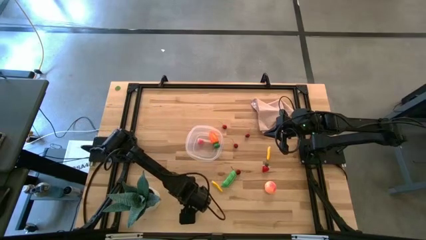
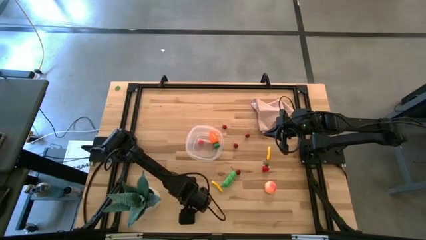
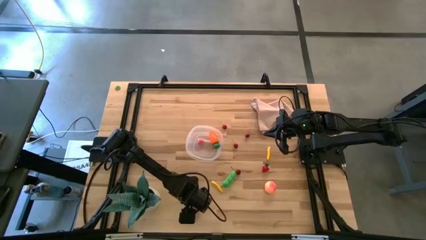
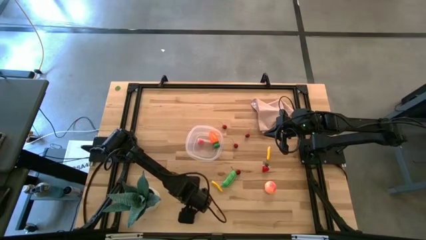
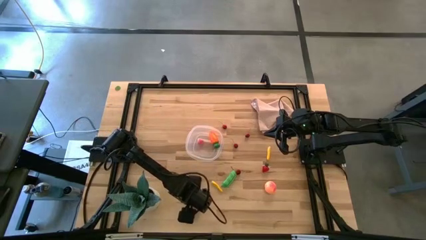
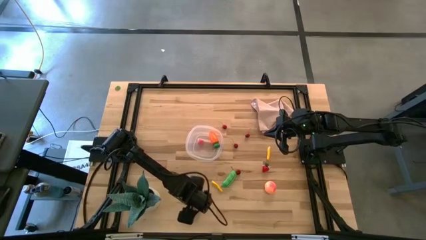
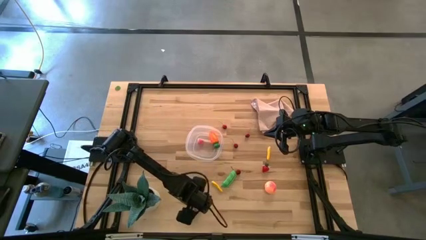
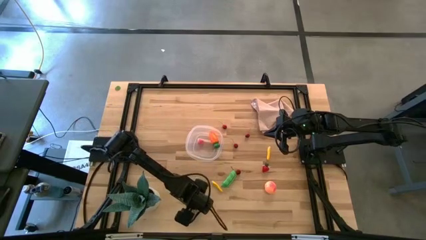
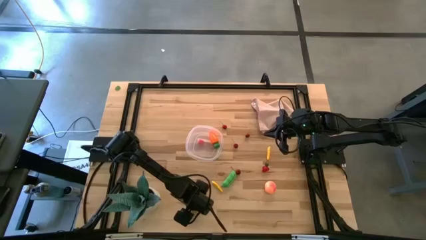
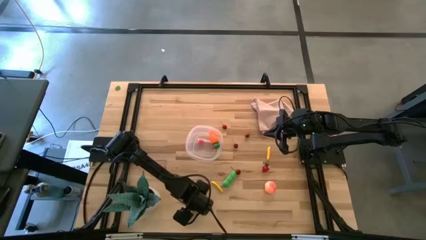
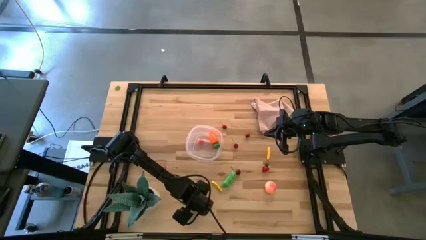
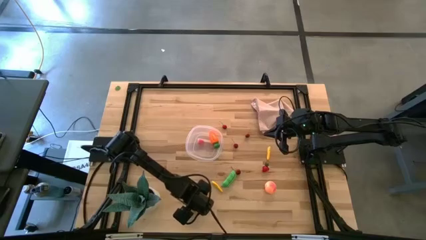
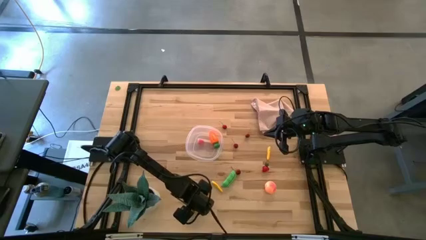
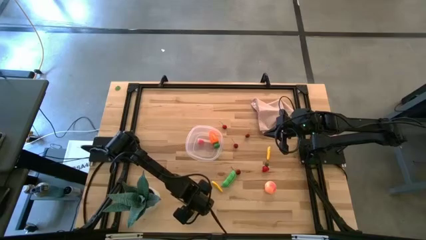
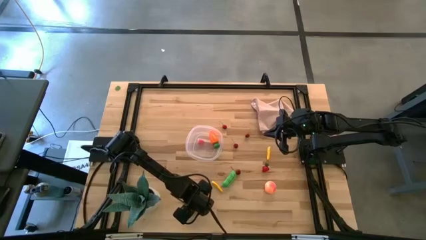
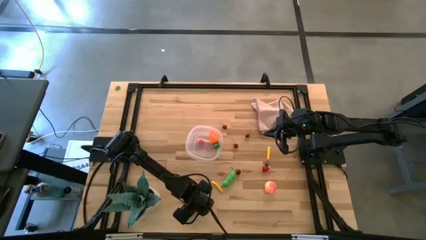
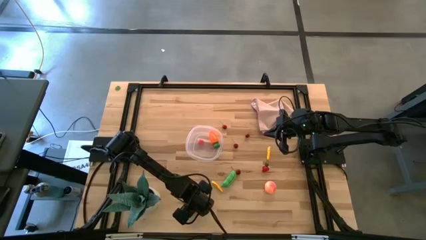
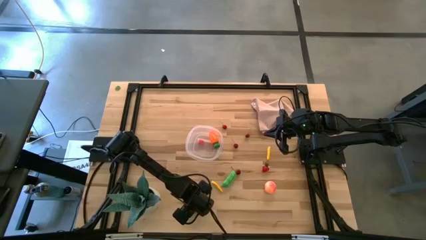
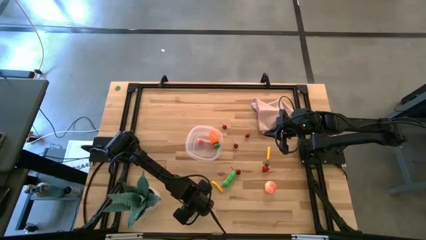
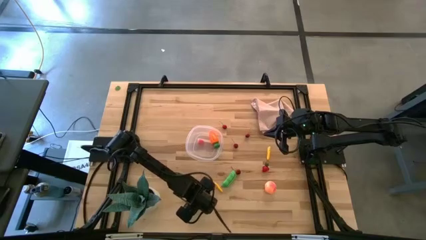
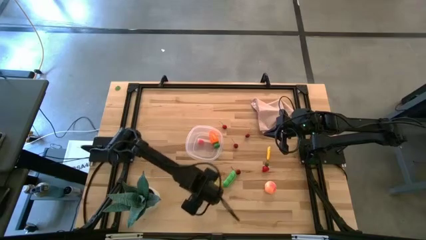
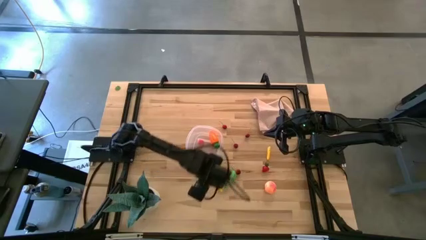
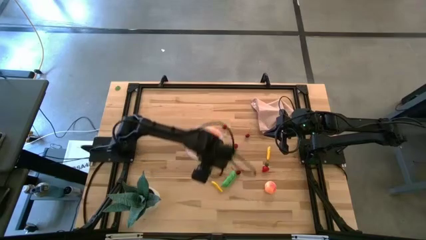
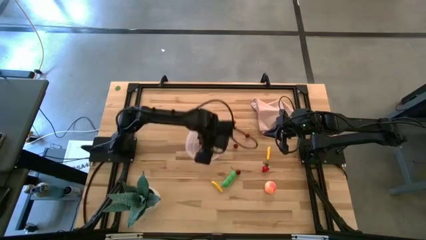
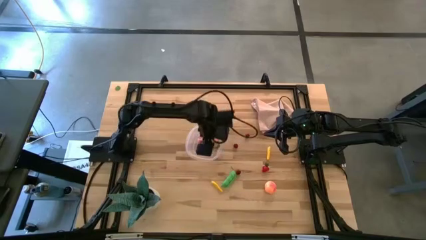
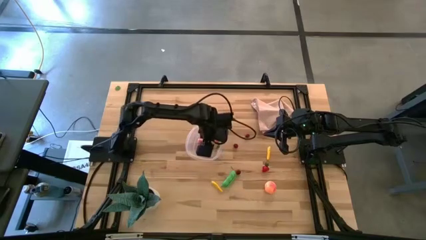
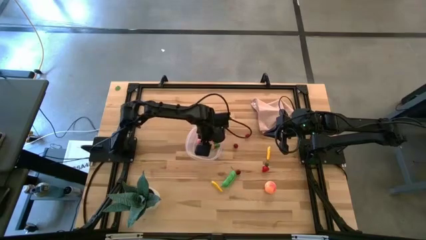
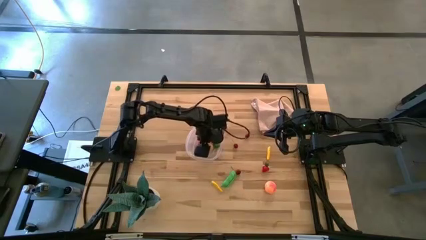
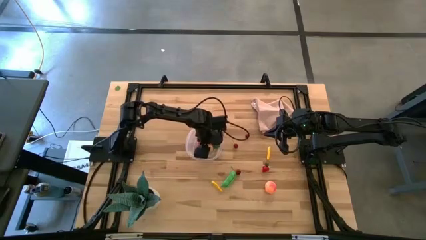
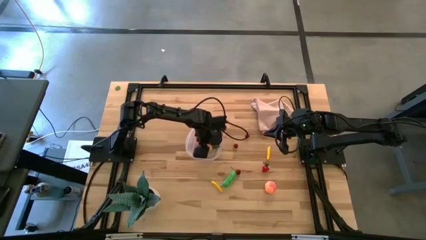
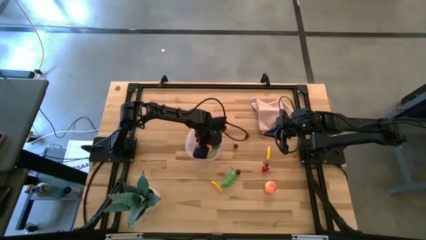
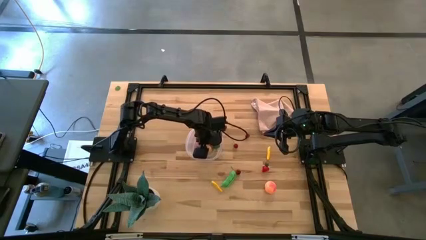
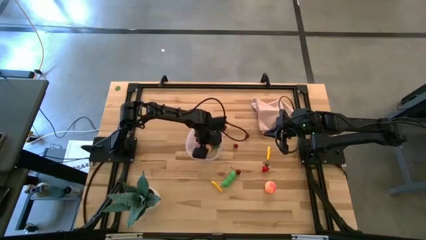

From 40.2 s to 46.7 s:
Task: Pick and placing Produce into tupperware
Put the potato into the transparent bin

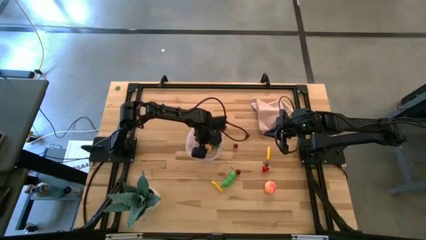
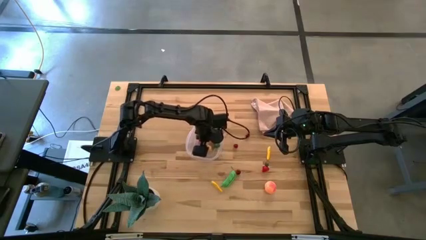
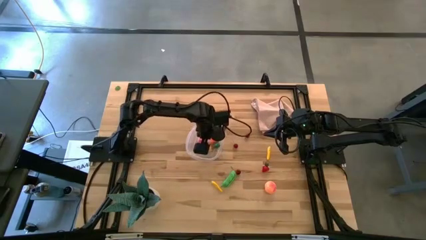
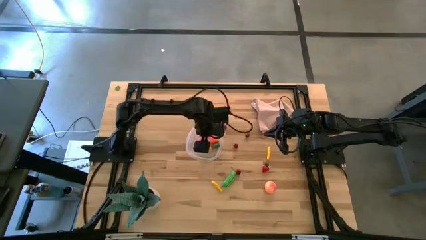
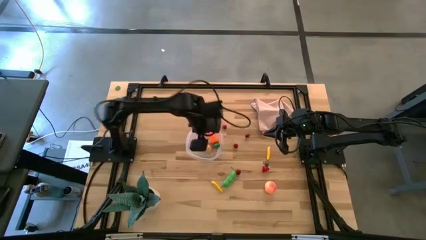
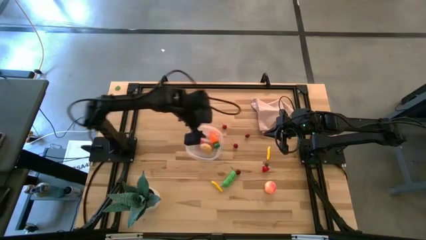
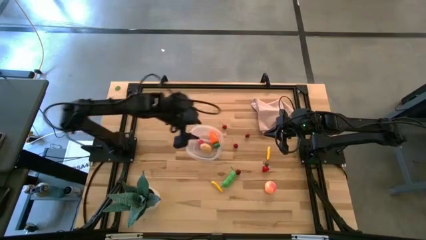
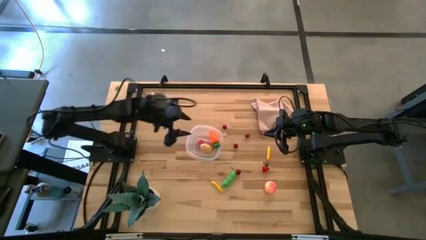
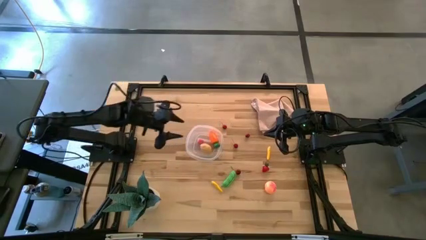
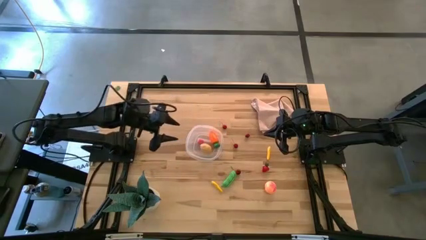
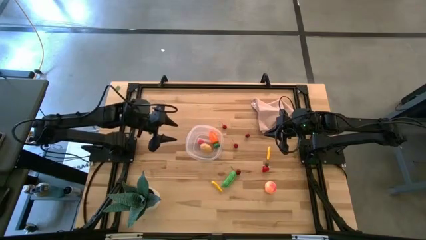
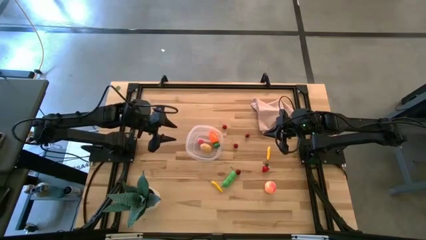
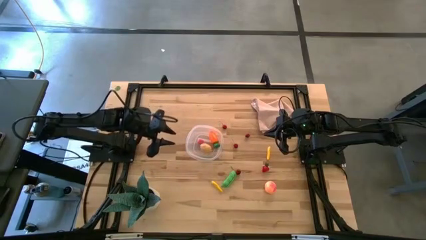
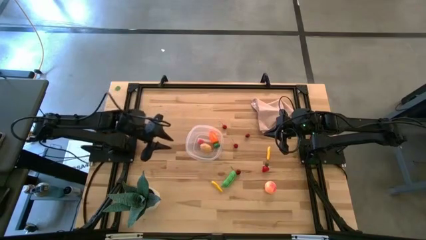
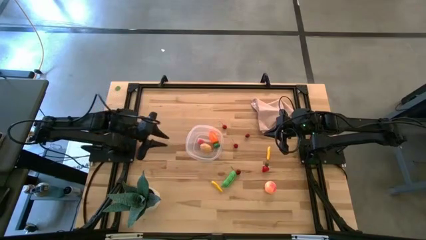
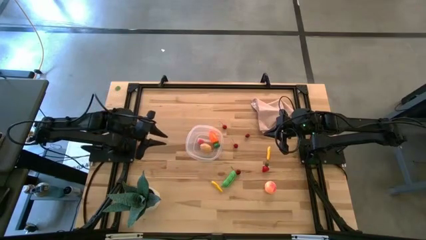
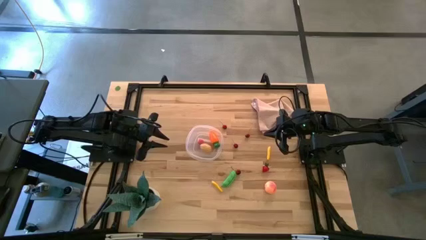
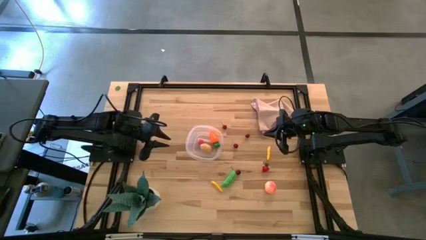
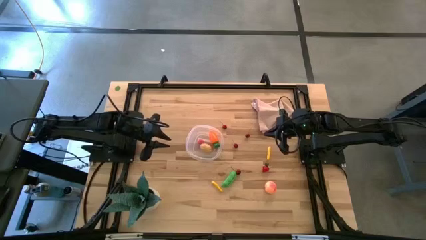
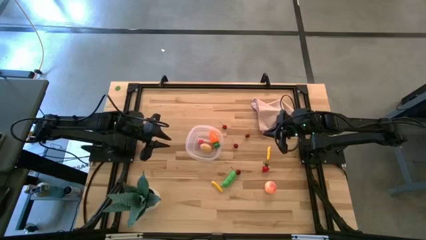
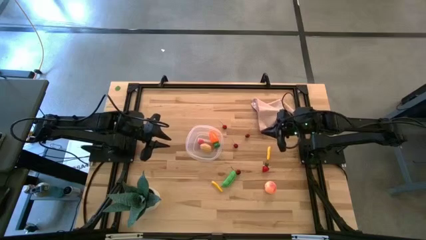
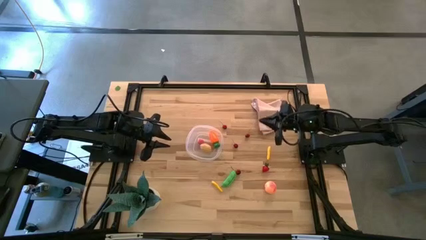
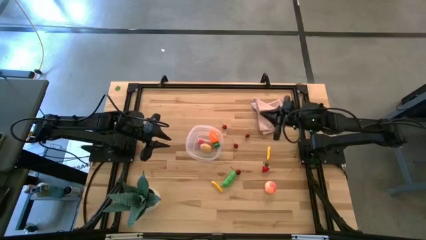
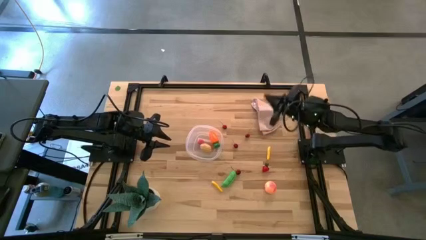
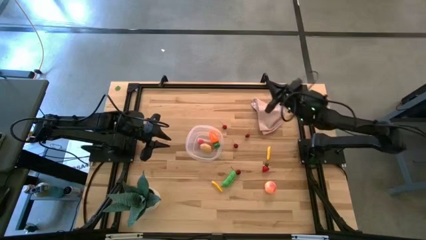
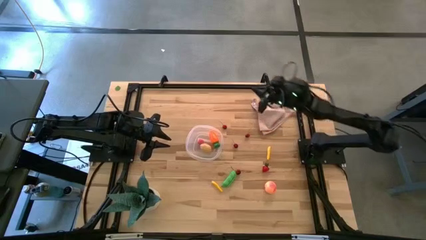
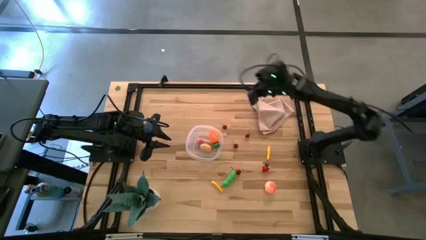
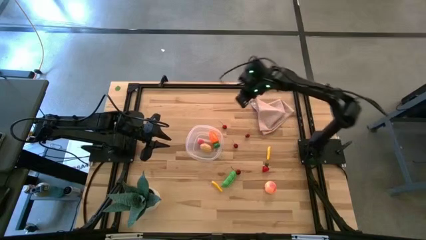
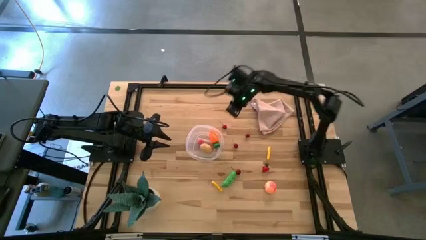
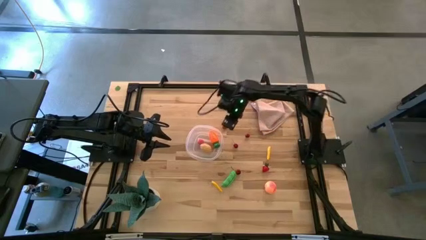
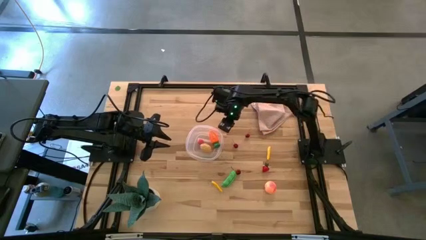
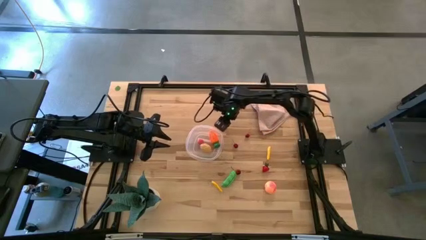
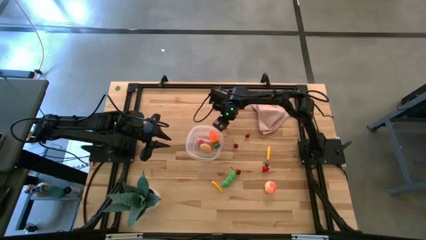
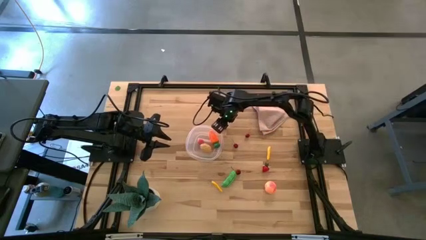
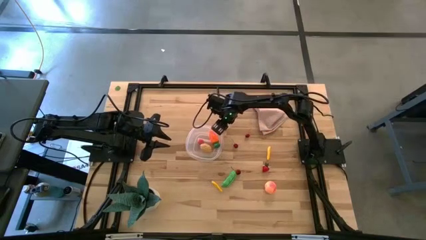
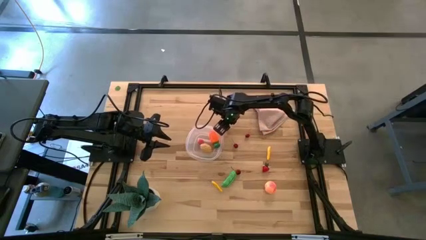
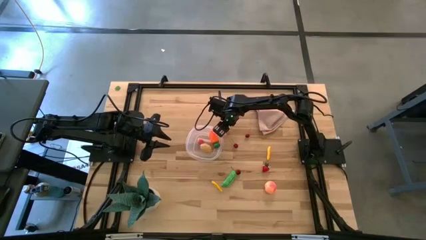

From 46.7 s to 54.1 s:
Put the cherry into the transparent bin

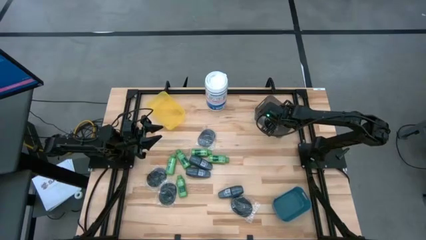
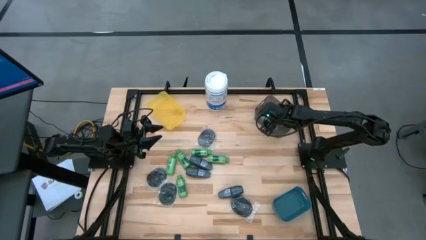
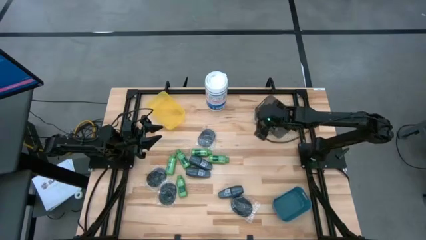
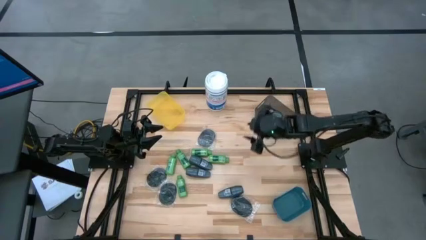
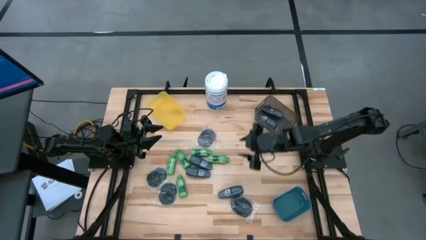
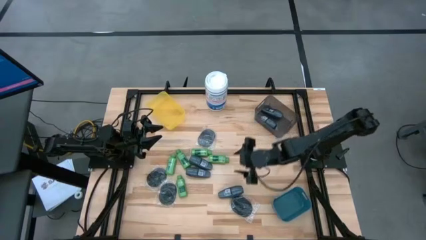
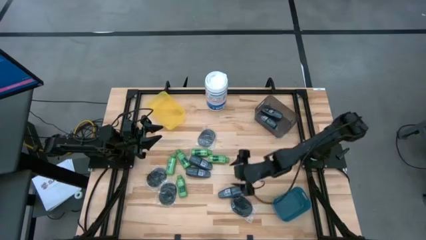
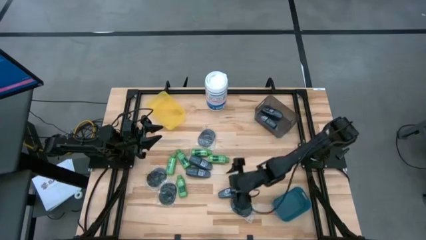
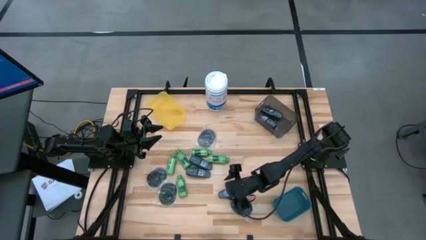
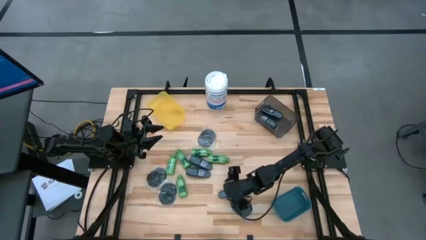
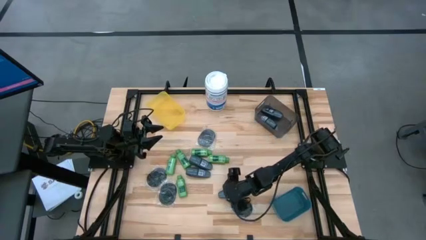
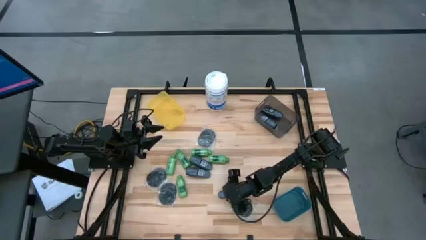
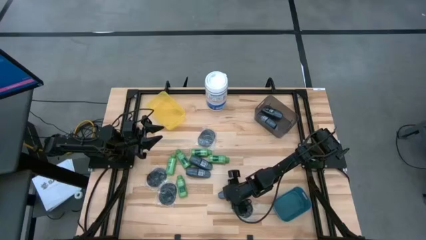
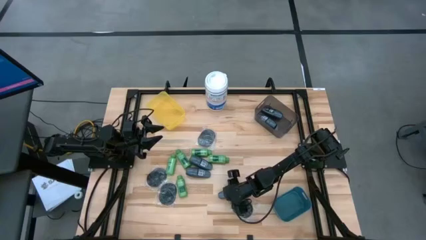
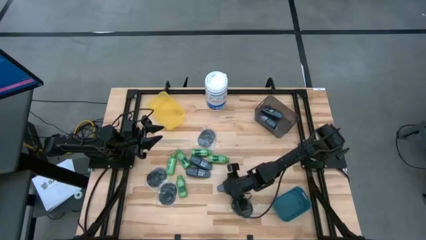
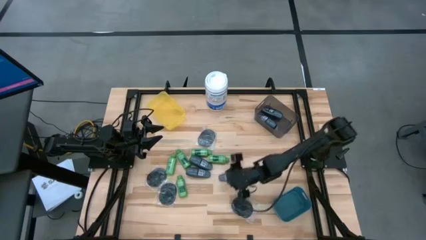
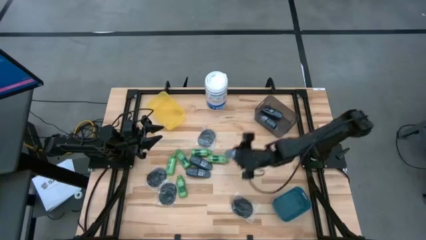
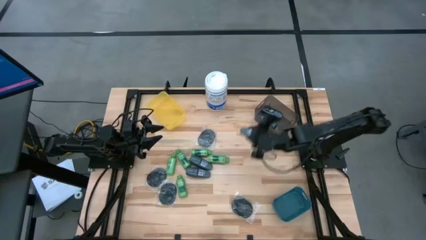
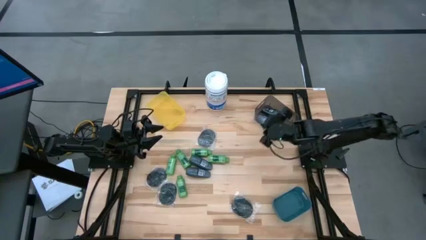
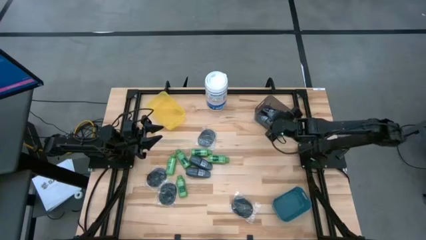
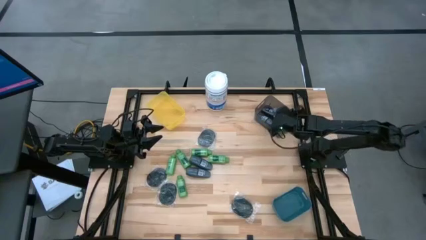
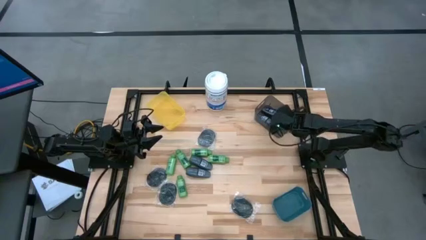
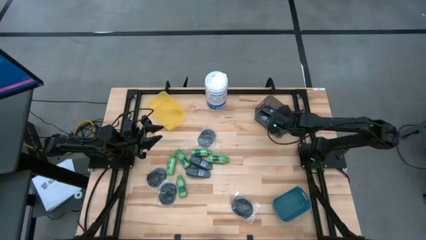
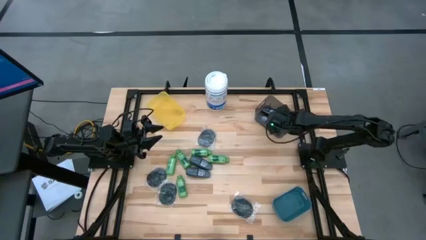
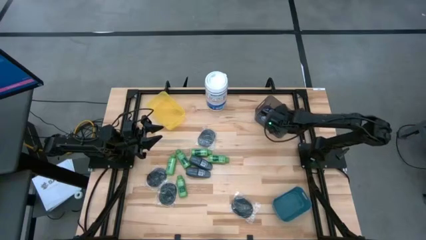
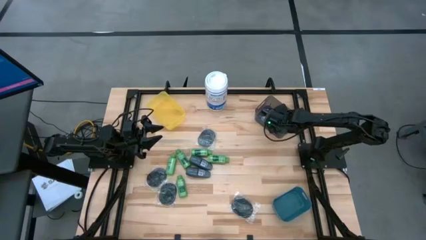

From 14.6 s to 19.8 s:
Task: Pick & Place Travel size toiletries
Put the gray deodorant into the black bin
